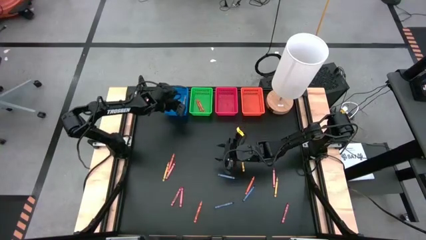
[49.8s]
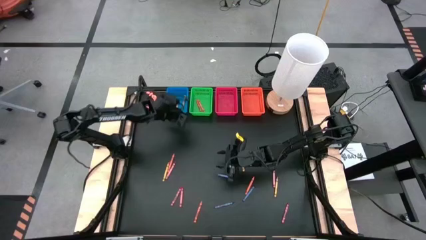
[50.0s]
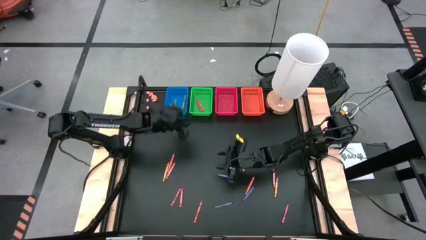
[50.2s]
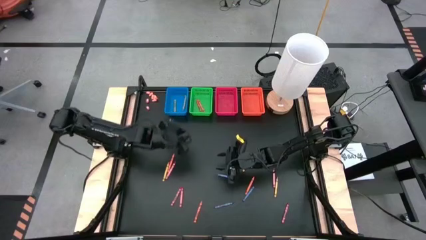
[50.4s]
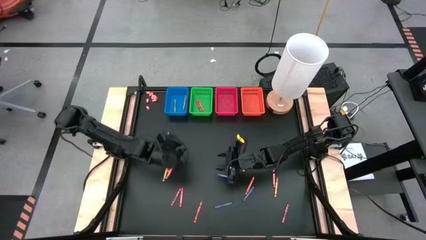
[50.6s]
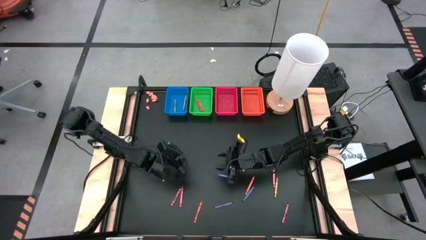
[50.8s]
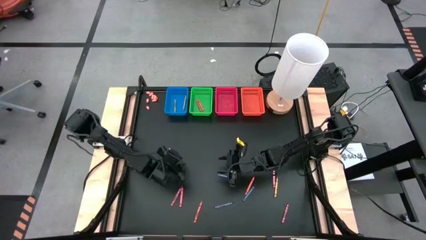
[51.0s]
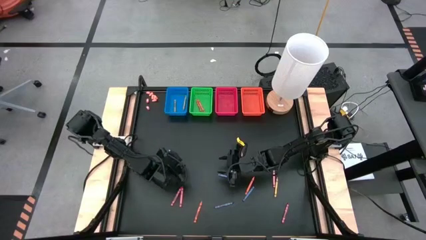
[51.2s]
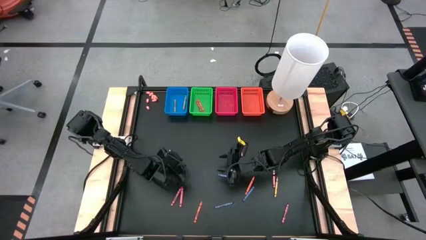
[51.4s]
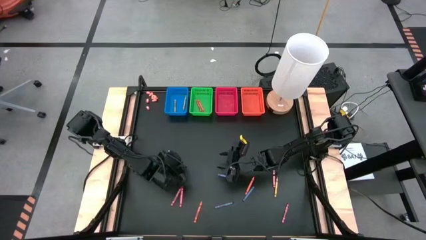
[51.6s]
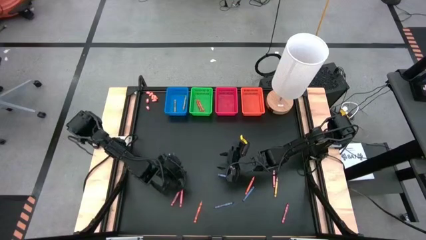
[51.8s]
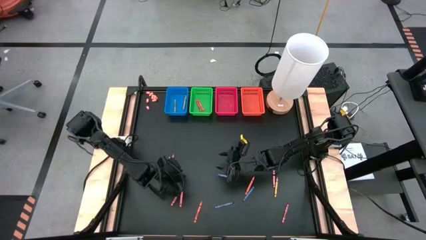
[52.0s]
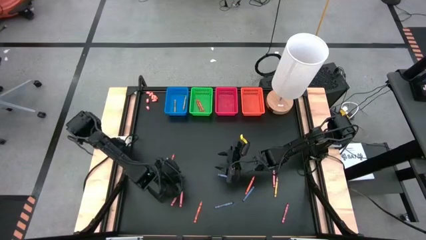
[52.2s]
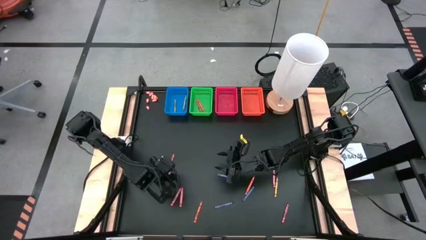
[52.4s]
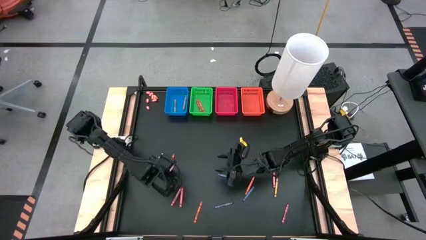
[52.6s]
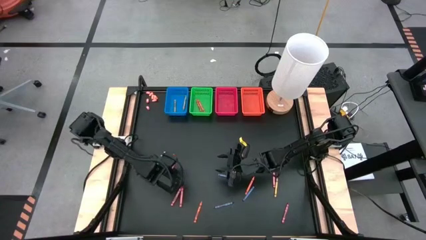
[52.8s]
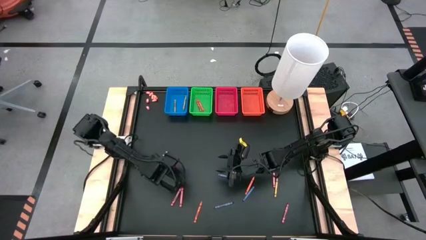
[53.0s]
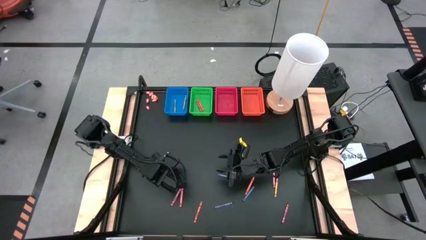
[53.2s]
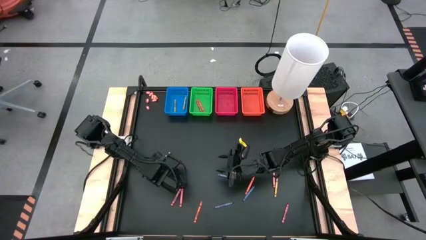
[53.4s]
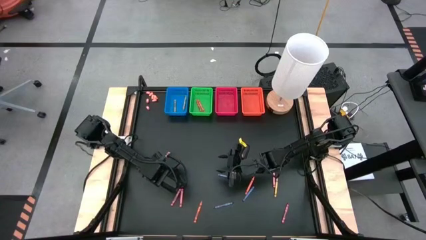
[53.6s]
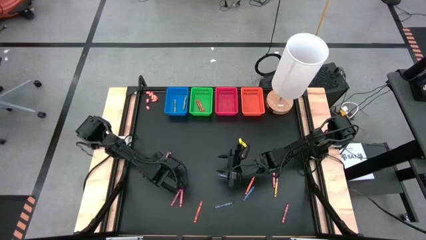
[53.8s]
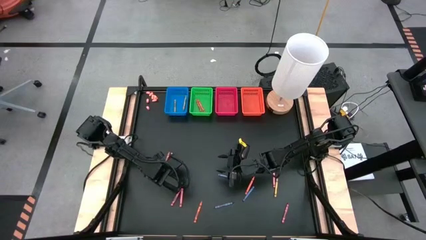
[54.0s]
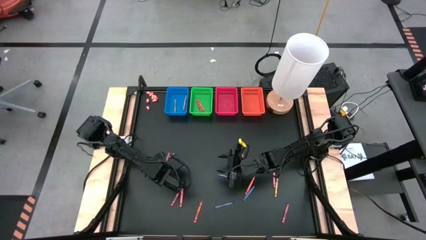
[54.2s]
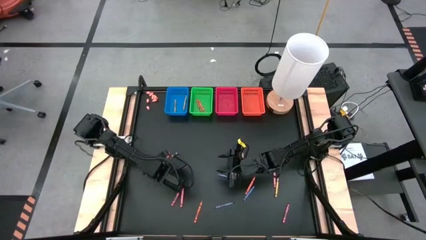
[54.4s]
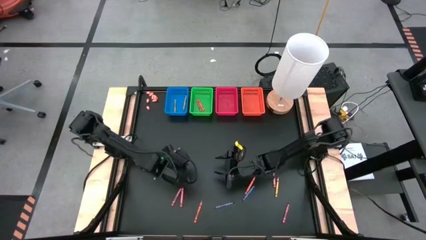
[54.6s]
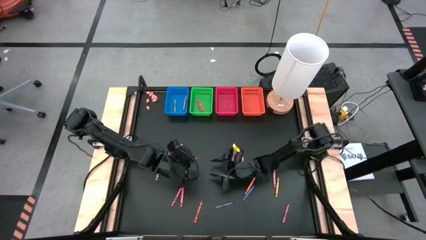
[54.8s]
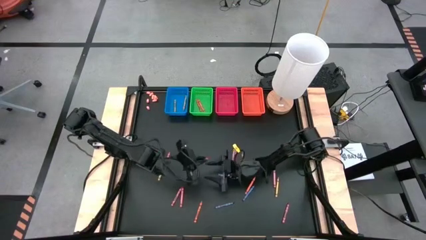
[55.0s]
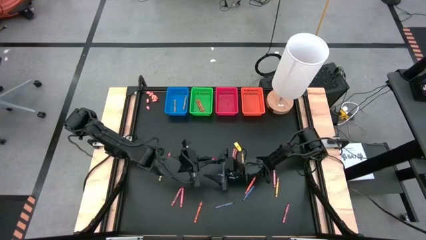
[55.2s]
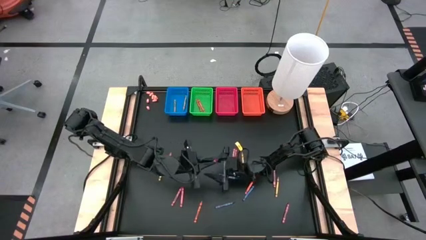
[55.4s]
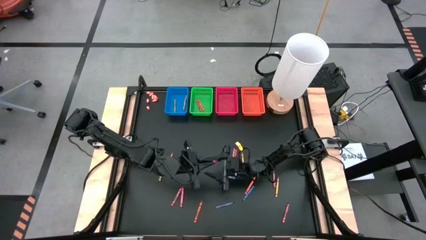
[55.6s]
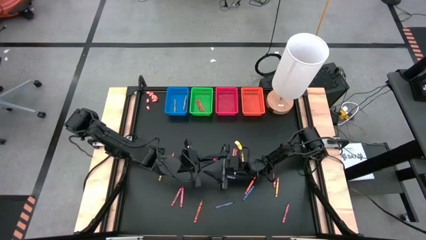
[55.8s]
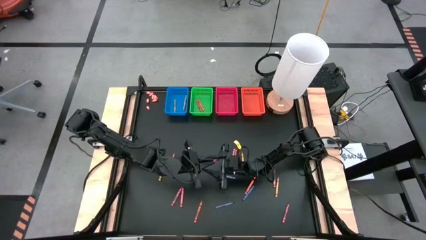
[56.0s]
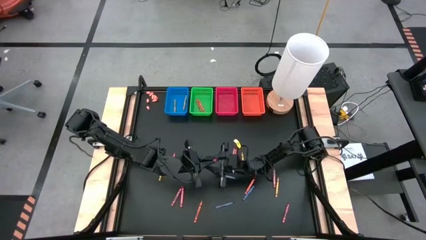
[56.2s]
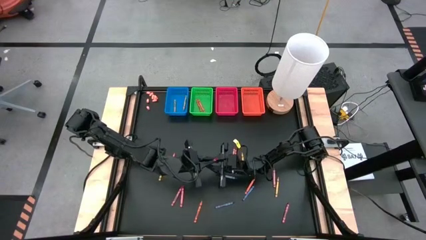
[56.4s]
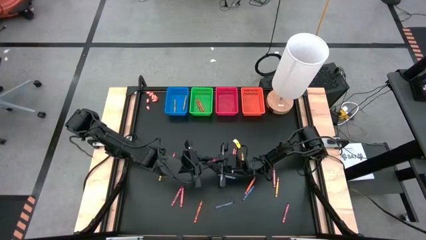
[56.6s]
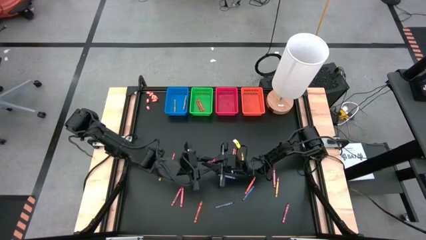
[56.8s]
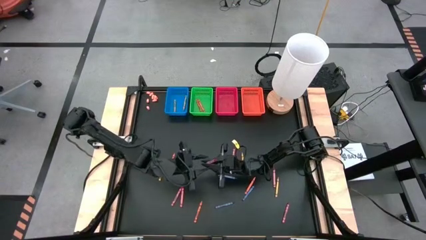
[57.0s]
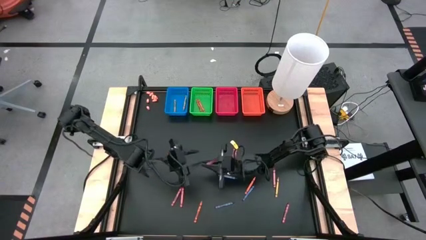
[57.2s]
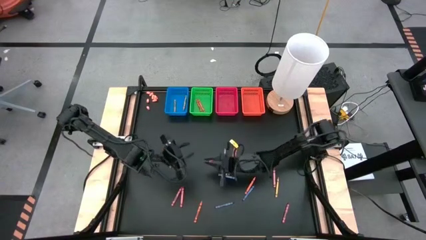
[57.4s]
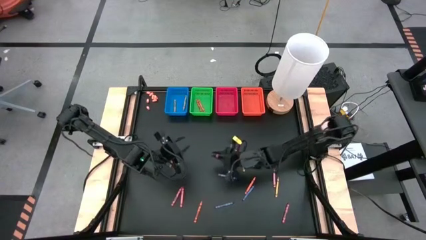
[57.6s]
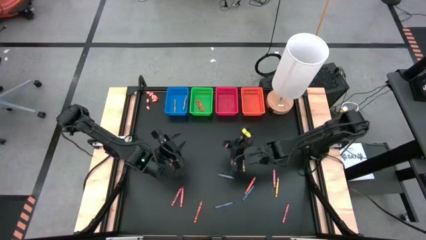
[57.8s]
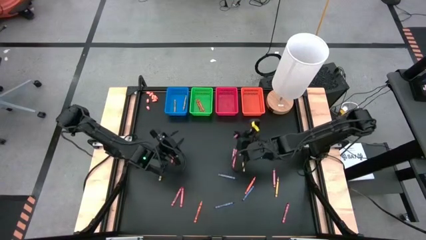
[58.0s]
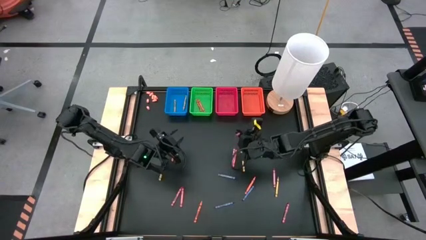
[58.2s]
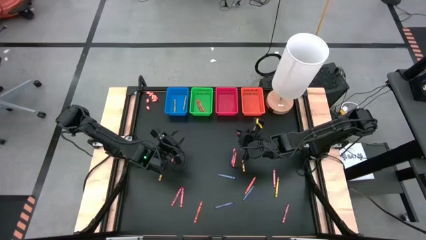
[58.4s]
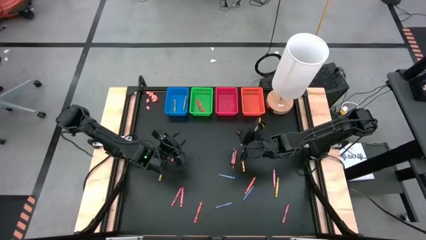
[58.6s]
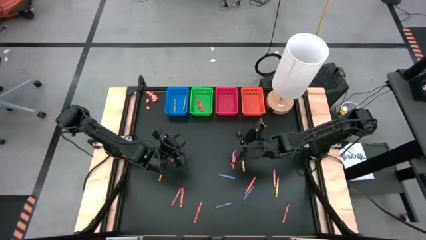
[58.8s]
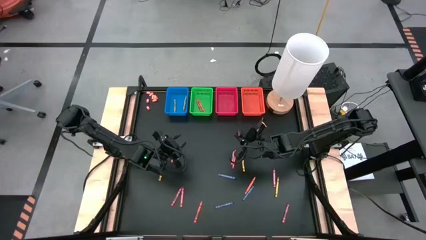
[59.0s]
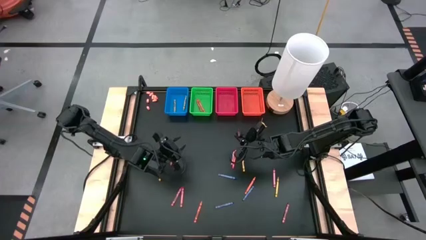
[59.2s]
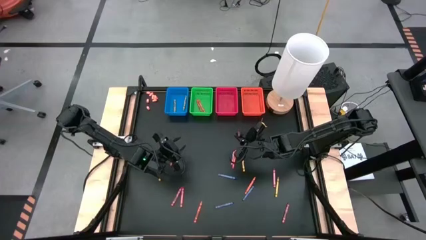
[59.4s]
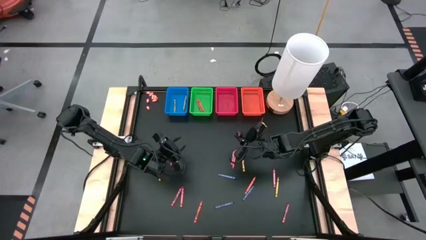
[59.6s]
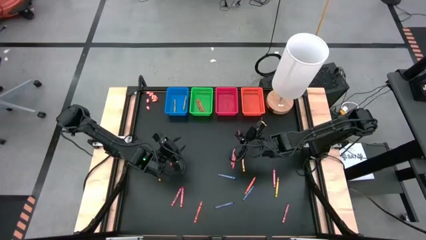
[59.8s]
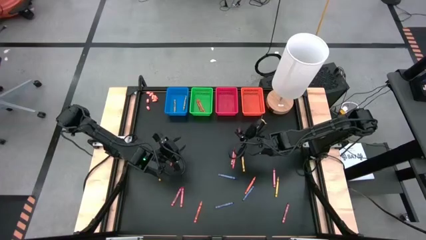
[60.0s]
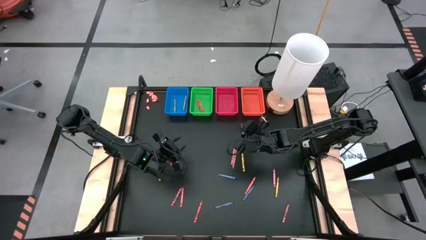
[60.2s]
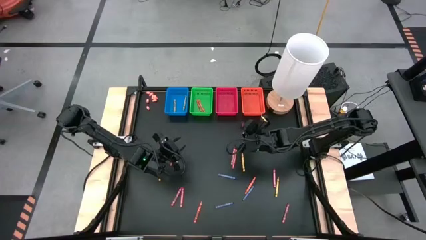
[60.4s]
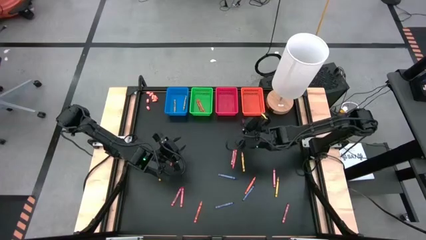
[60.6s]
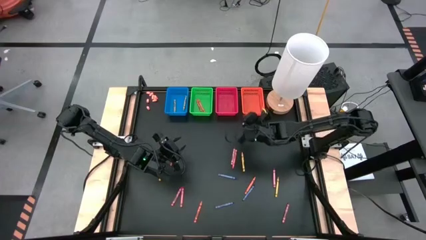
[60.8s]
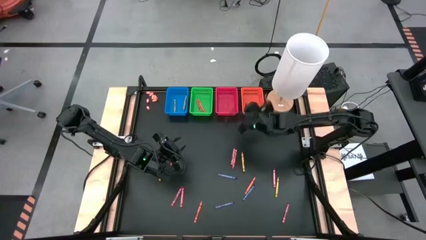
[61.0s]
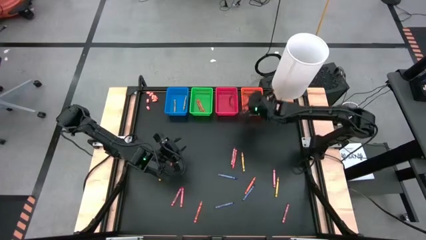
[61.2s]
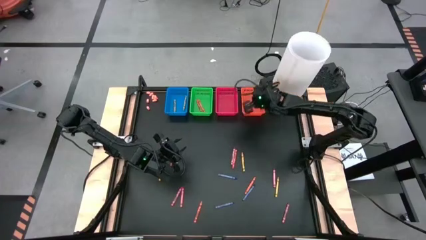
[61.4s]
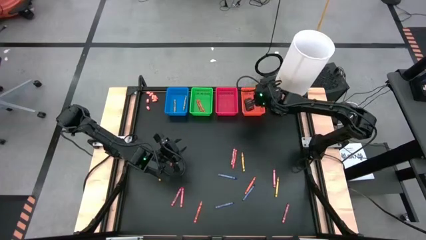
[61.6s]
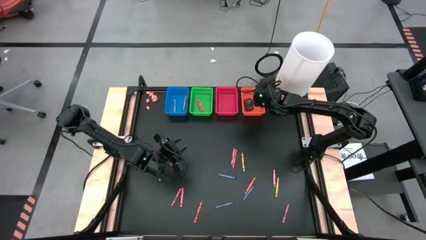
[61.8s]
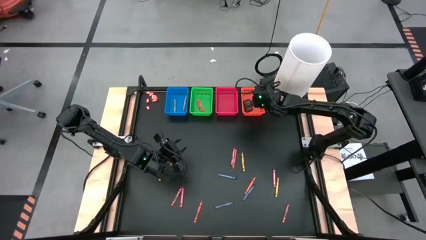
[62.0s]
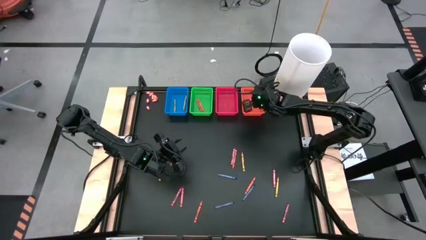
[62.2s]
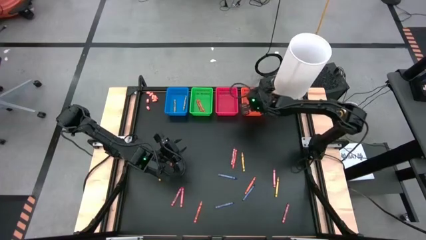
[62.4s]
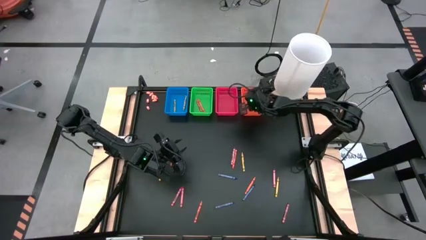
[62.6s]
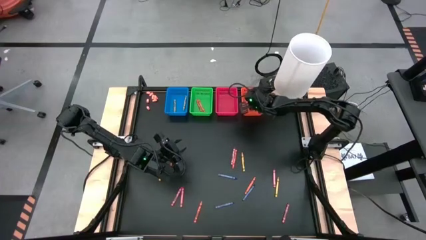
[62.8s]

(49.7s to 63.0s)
Task: Sort crayons
Put the red crayon into the orange bin

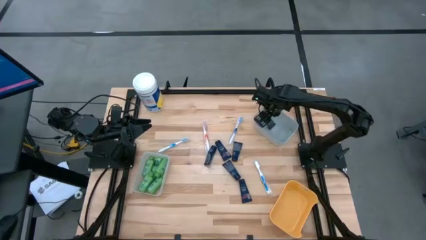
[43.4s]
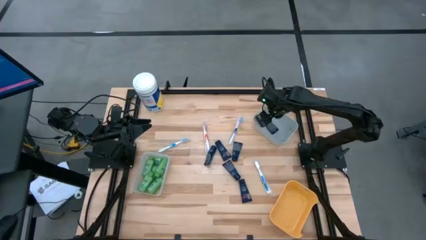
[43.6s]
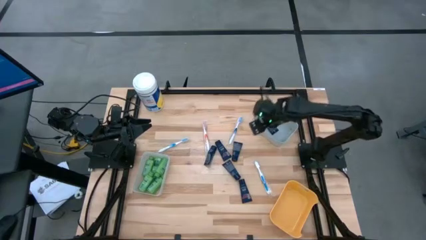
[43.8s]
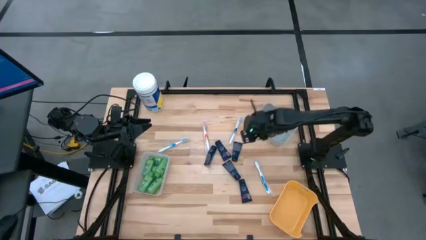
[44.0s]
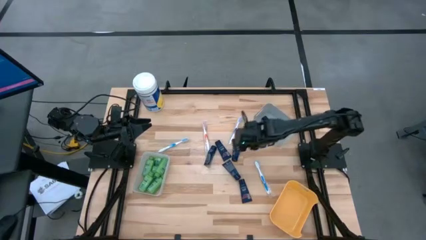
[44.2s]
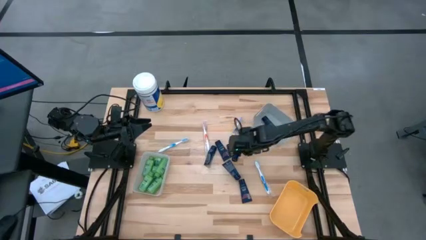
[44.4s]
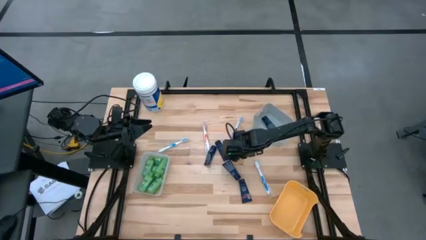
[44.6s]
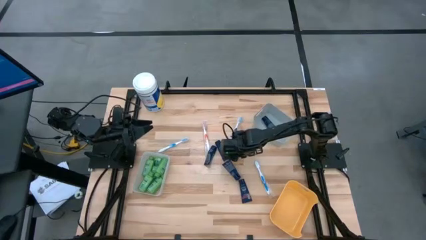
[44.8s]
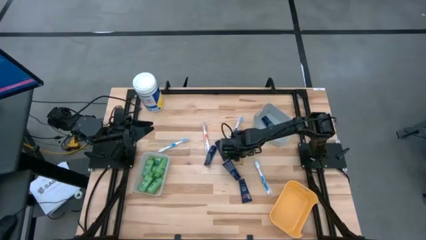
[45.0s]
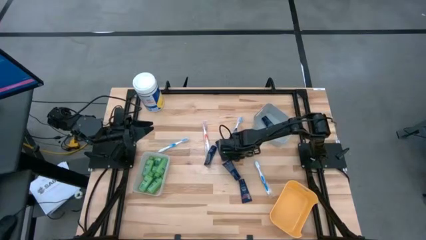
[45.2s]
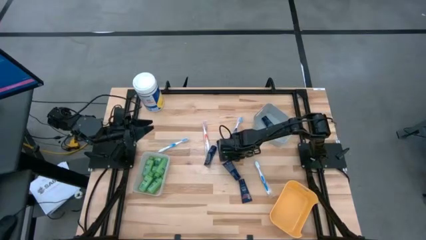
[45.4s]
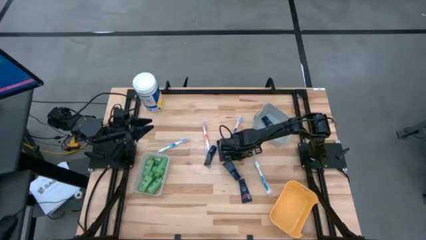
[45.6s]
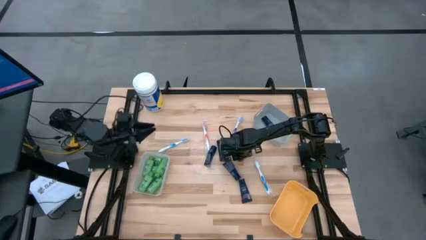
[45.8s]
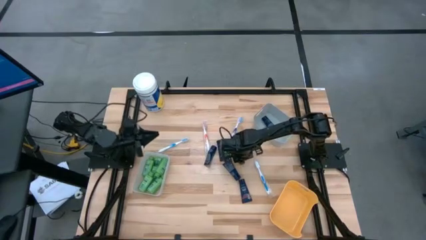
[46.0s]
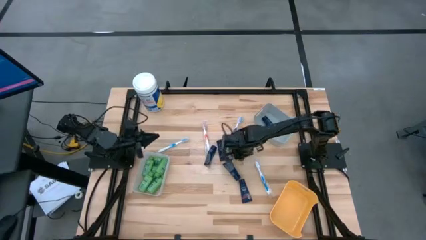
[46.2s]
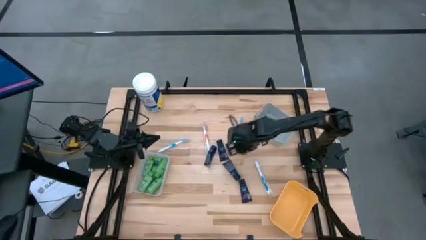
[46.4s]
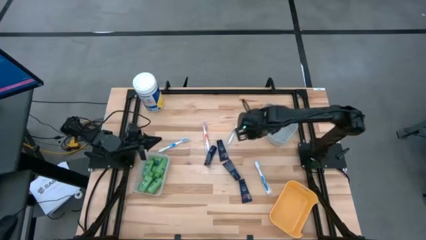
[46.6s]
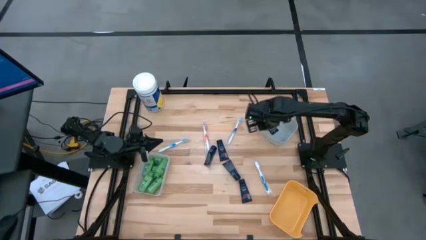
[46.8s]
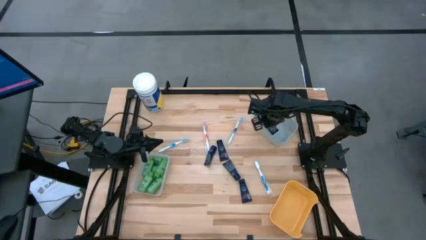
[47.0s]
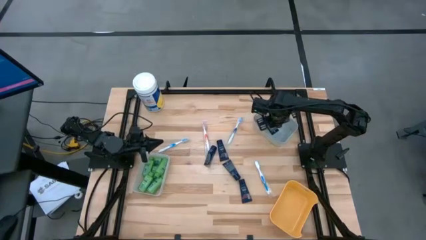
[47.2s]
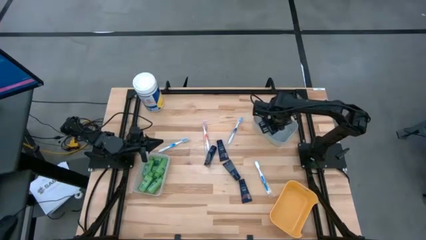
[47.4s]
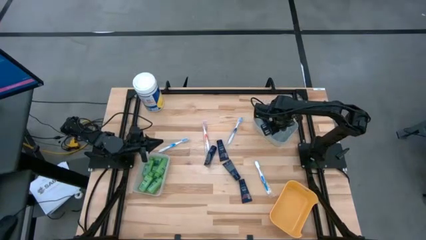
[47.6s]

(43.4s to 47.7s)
Task: Pick & Place Travel size toiletries
Put the blue shave cream tube into the gray bin
